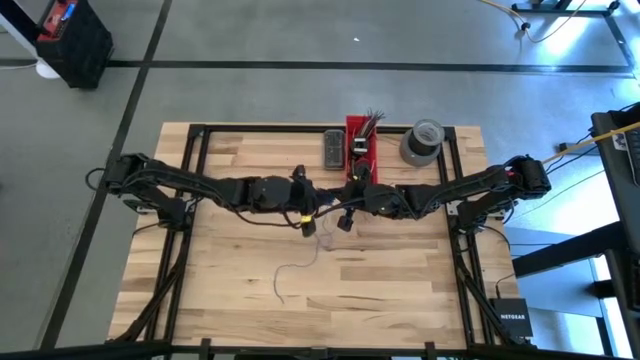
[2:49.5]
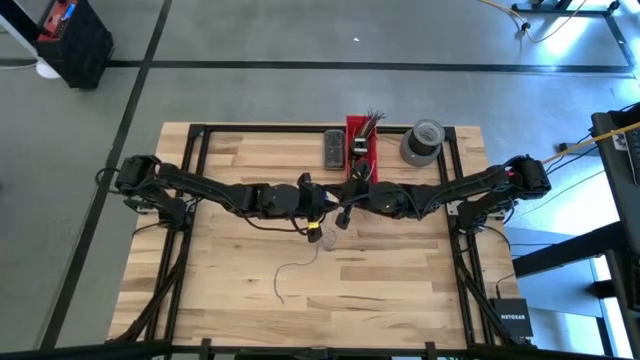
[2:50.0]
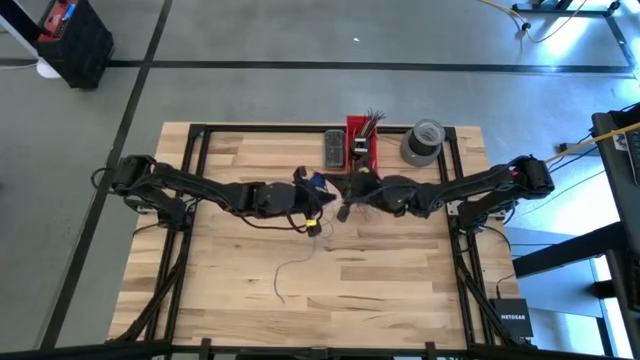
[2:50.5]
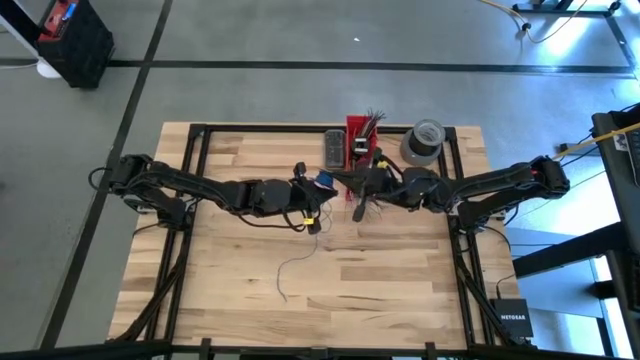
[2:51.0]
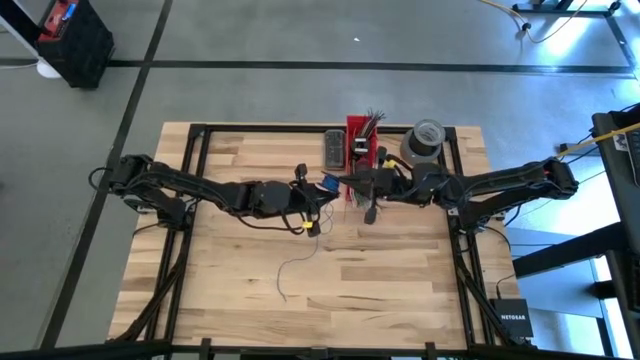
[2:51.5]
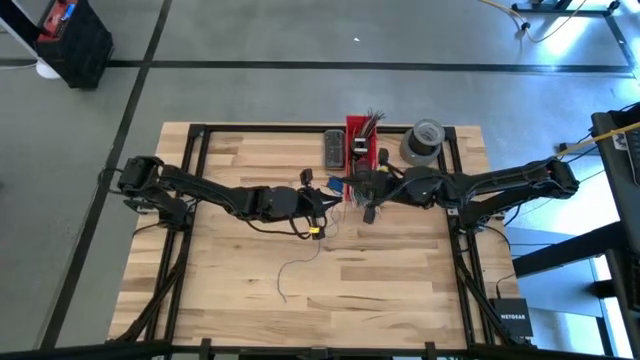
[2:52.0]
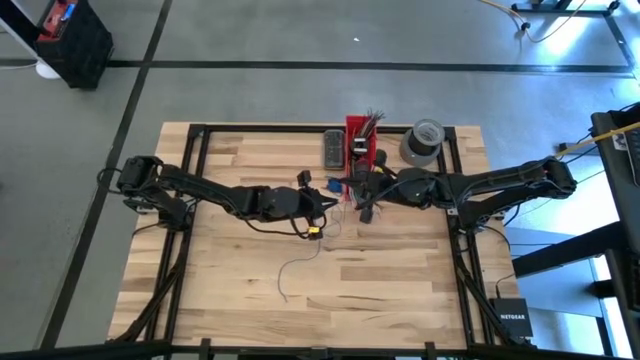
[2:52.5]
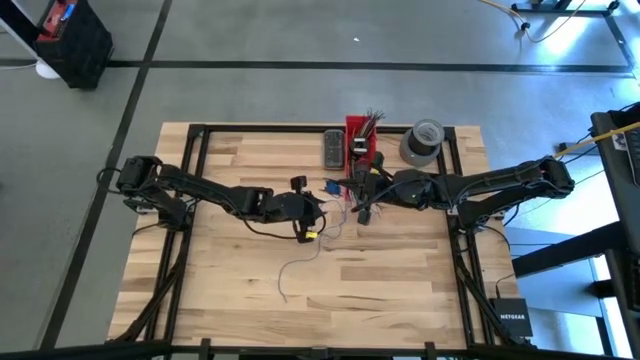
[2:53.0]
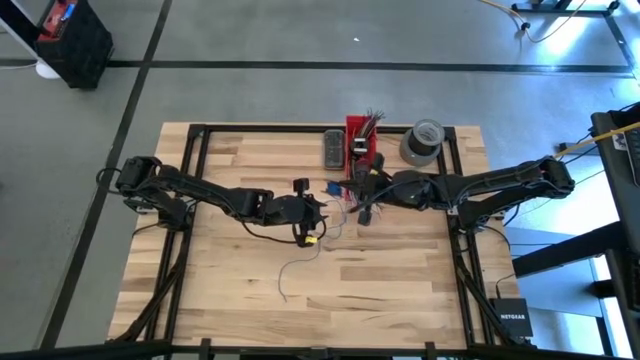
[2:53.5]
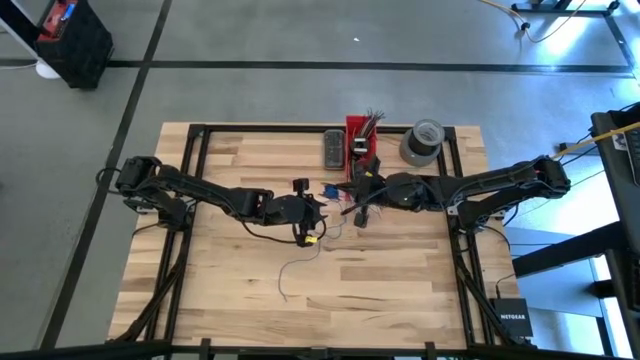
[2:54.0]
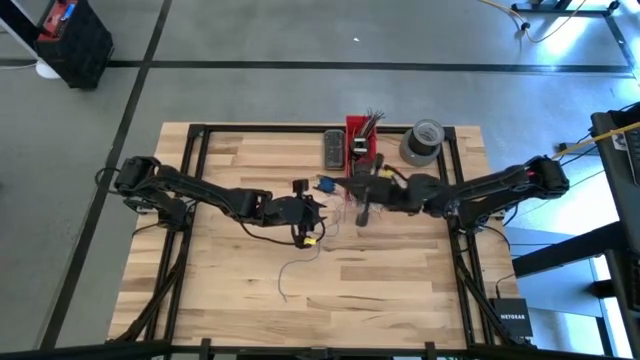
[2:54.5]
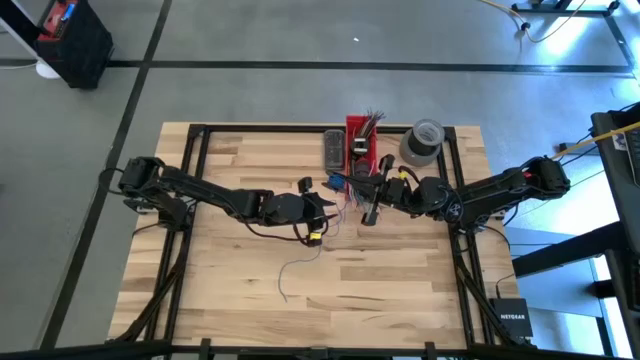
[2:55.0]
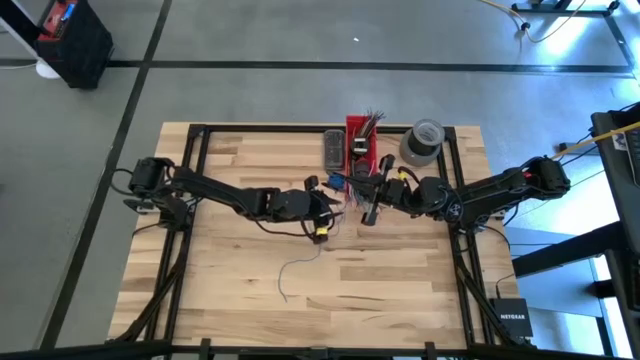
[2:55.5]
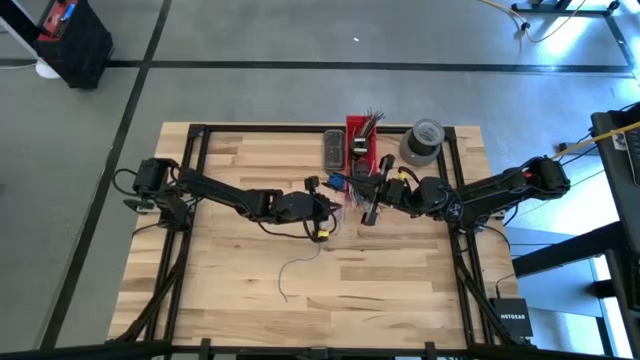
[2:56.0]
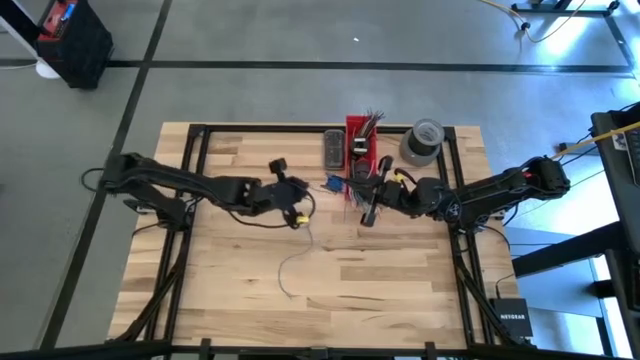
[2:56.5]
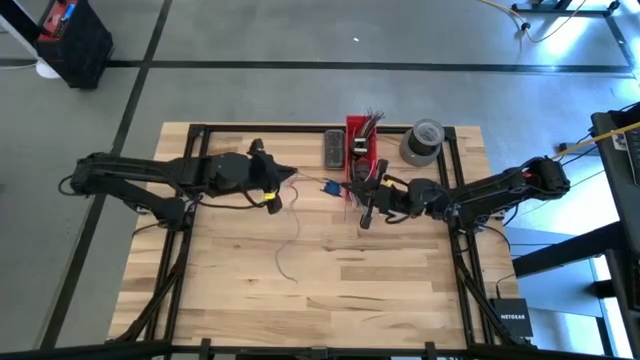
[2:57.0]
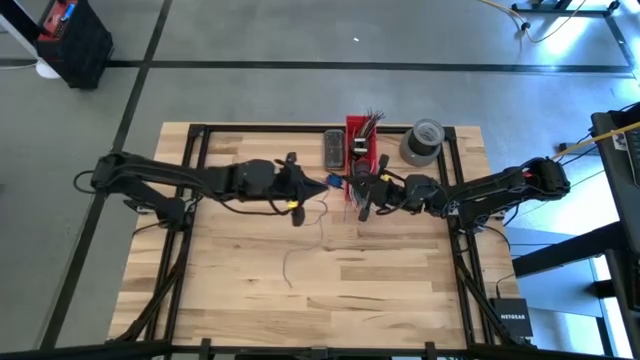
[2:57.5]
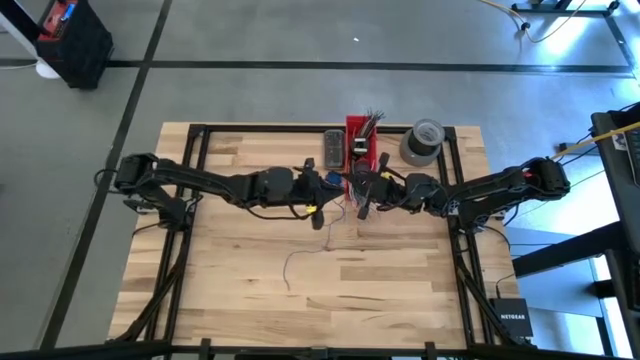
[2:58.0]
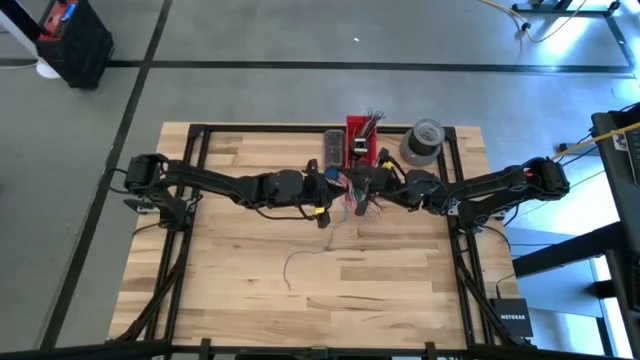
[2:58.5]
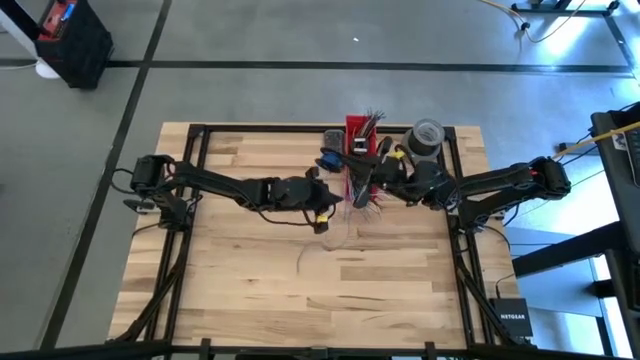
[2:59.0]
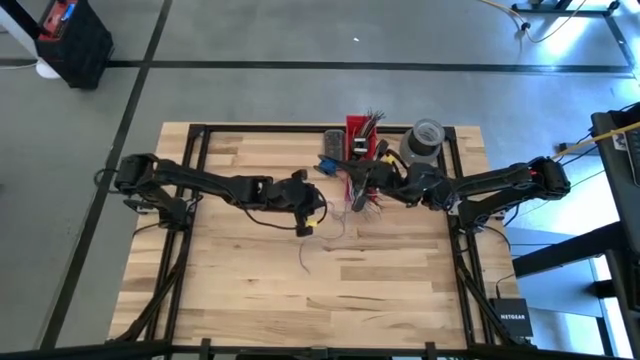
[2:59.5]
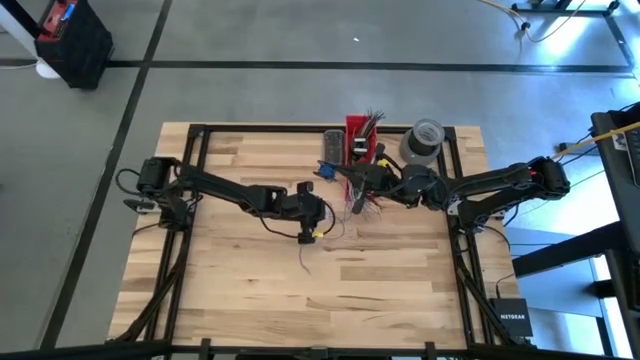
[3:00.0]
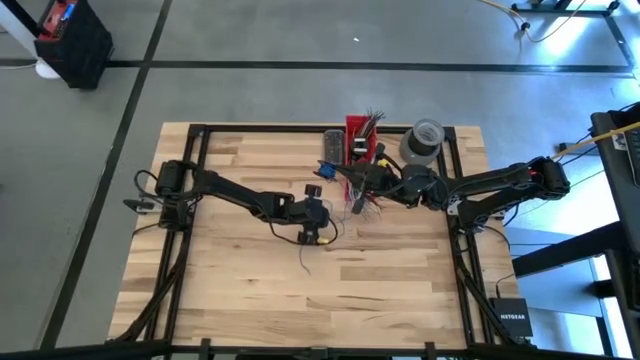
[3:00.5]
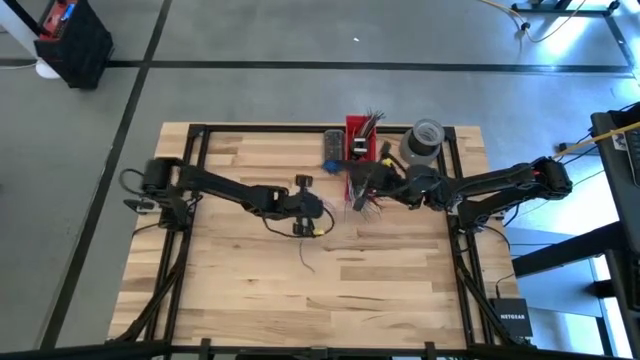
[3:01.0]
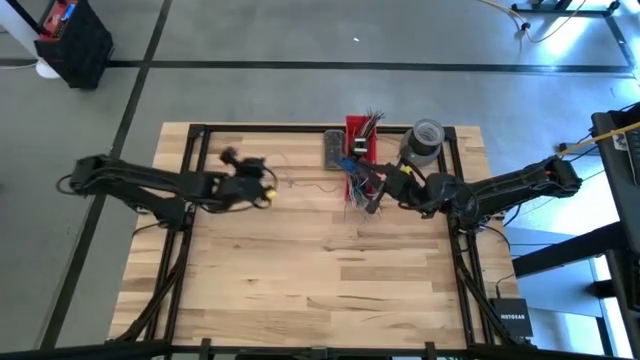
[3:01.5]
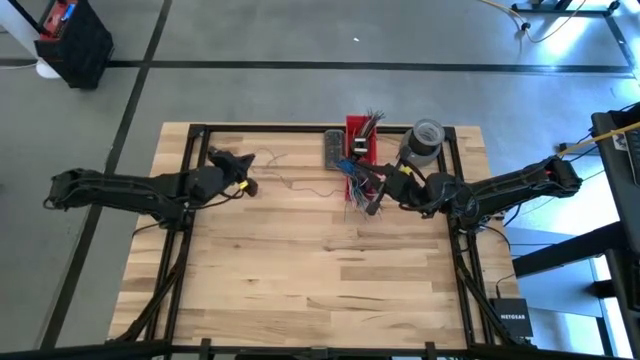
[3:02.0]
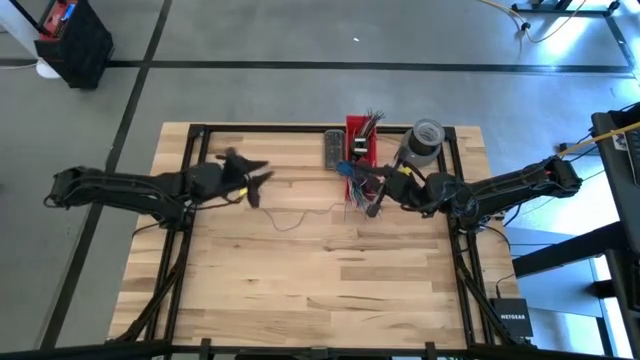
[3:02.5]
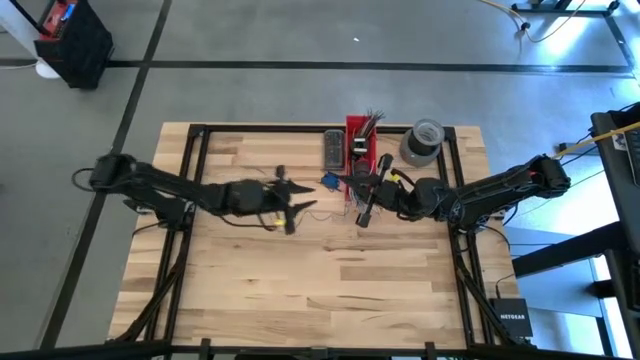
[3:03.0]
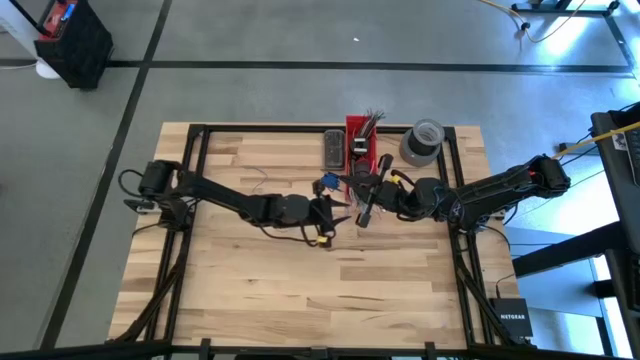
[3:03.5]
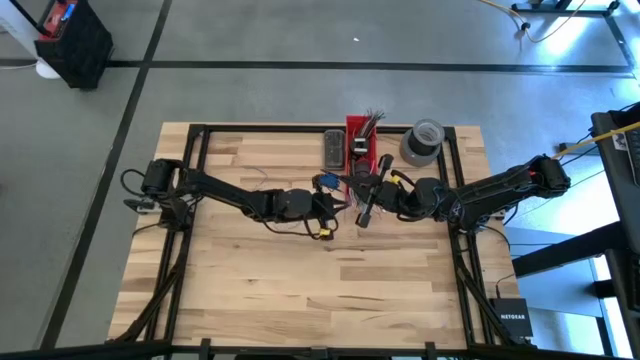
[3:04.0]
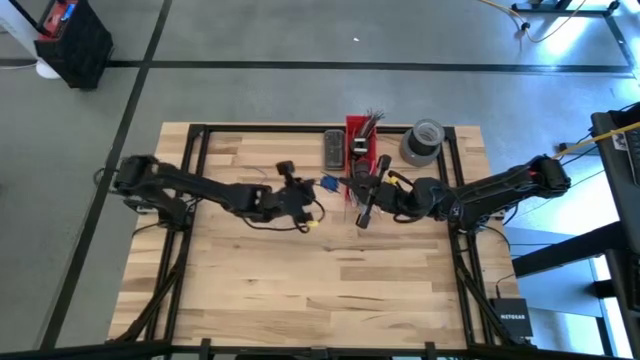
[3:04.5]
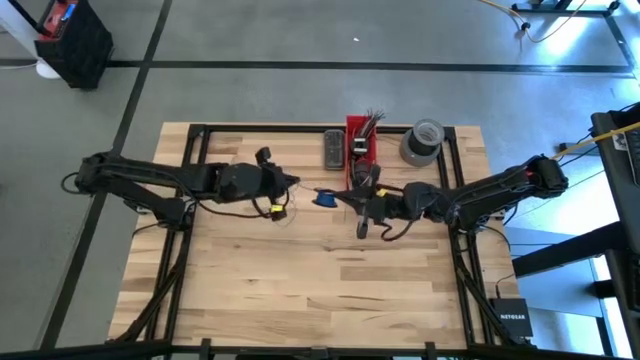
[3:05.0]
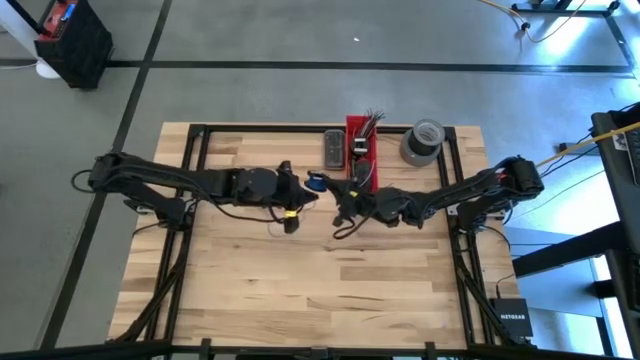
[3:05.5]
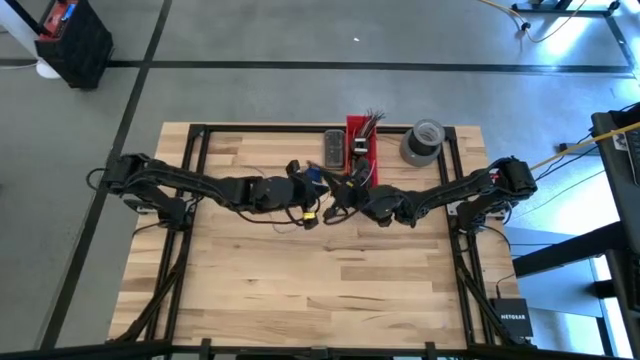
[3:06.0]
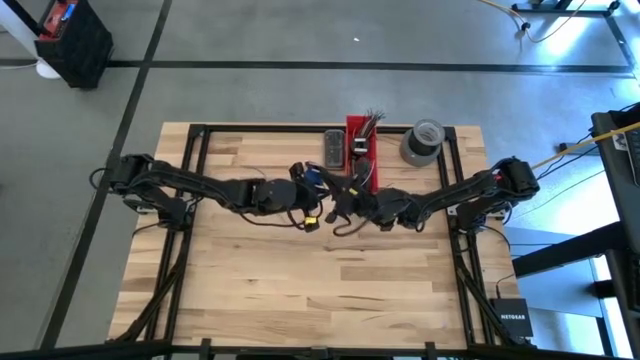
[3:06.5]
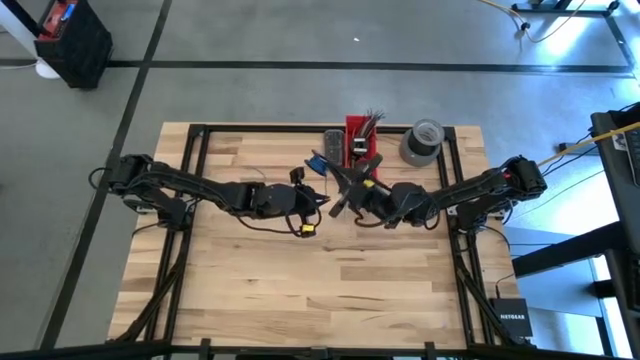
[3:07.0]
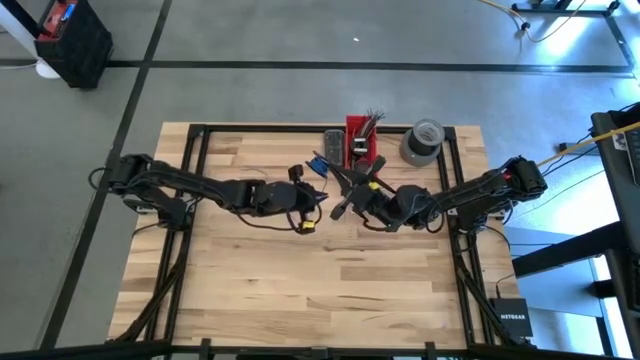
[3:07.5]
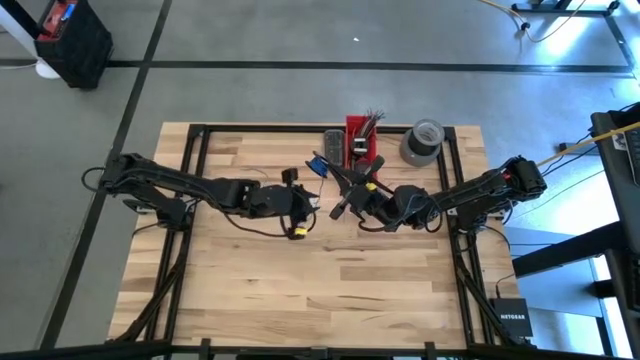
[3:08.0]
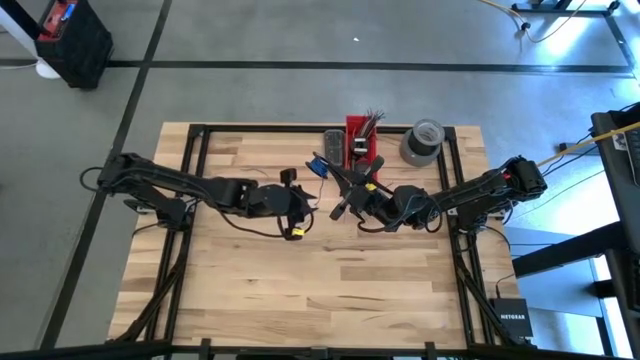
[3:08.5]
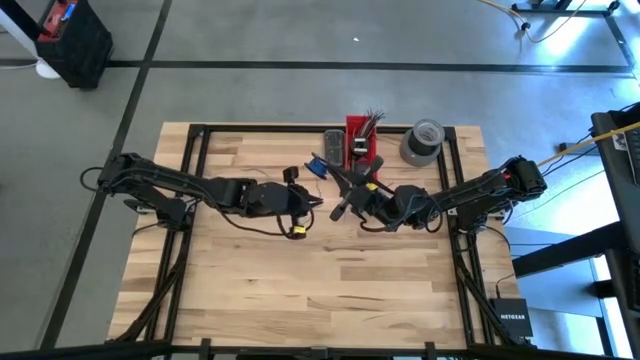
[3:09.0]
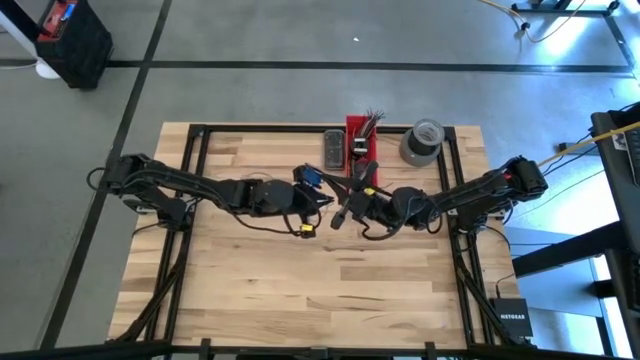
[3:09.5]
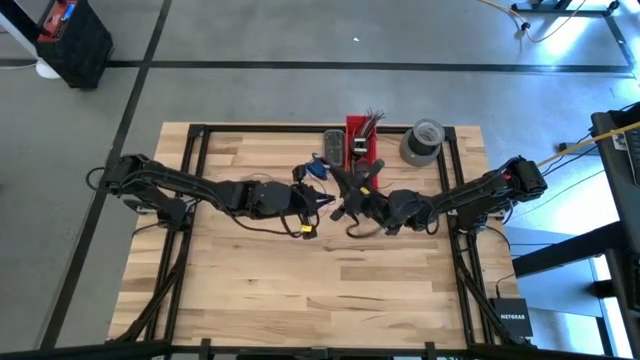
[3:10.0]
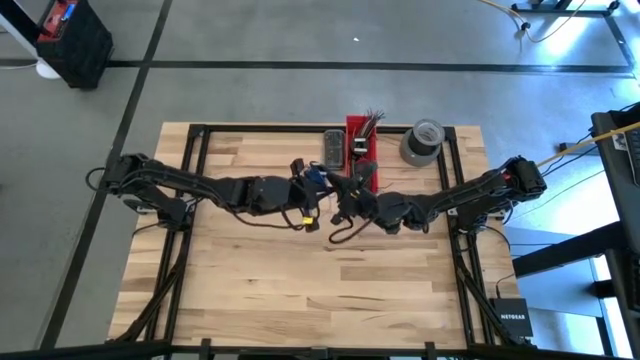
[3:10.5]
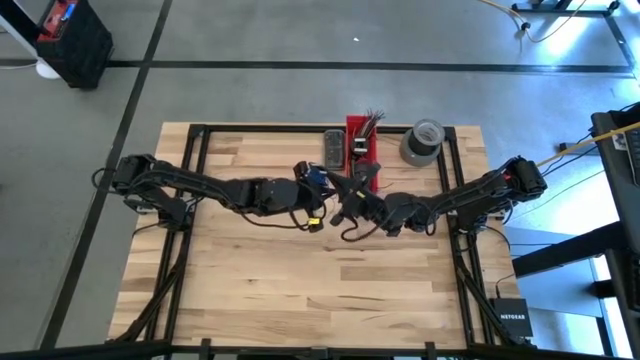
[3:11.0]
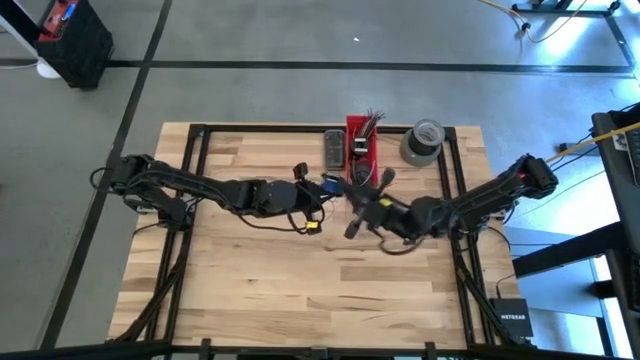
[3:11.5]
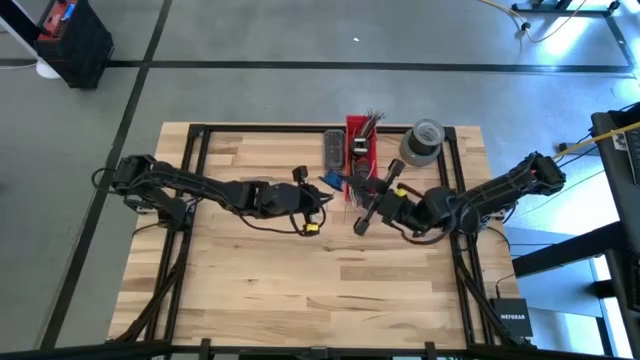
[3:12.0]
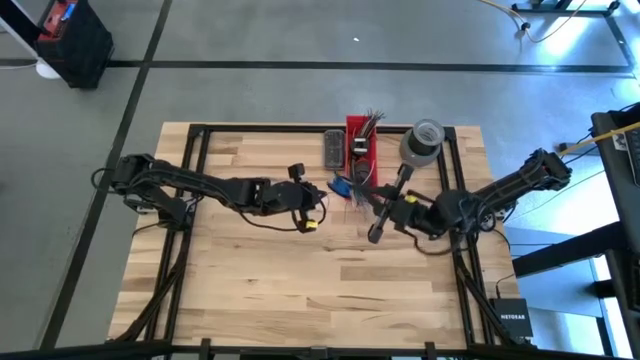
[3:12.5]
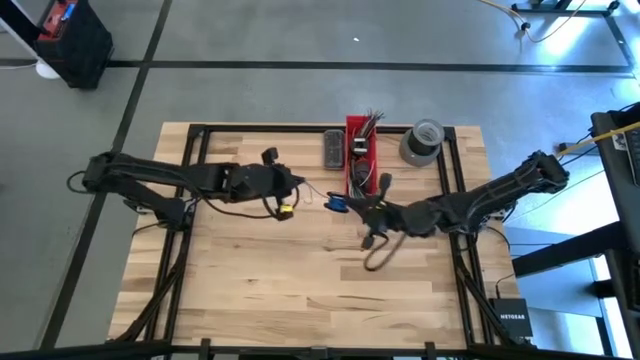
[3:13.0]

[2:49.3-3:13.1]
Task: Coil cords
Coil the blue wire into the black spool
